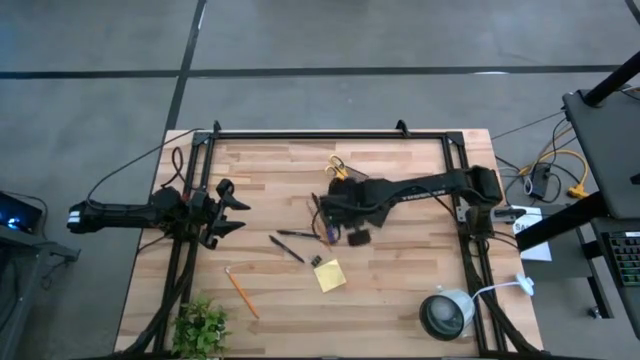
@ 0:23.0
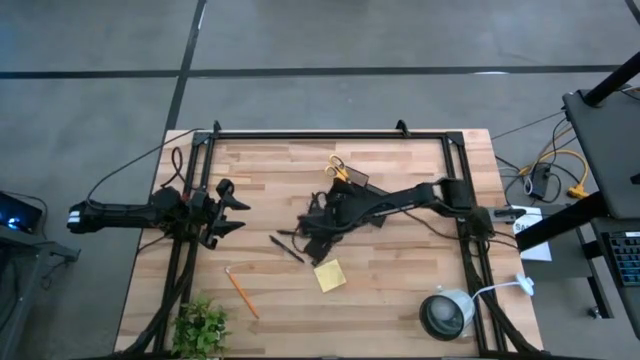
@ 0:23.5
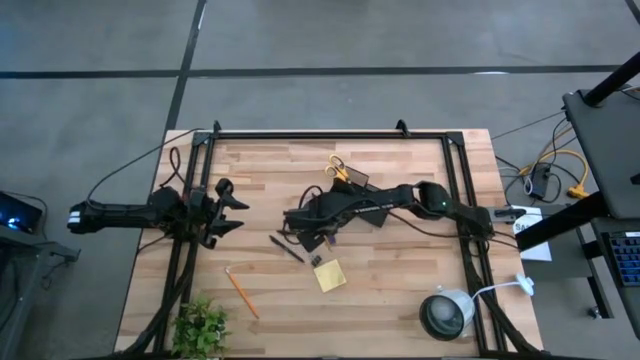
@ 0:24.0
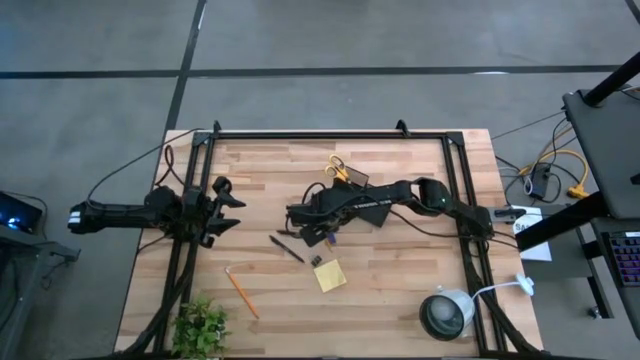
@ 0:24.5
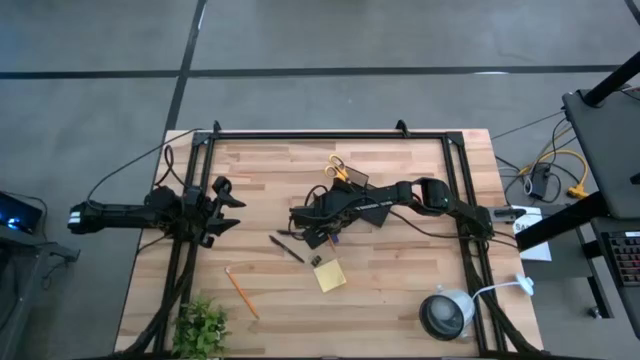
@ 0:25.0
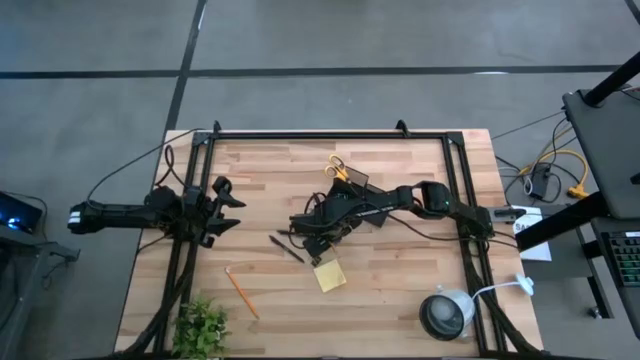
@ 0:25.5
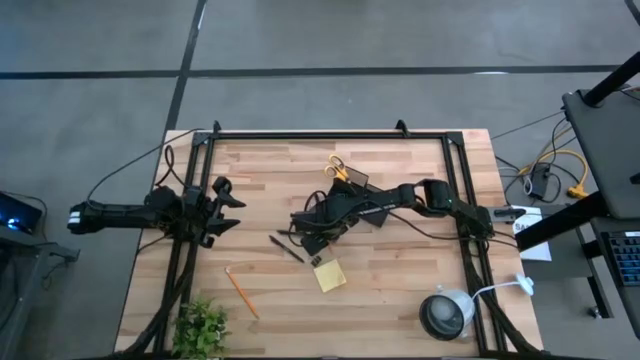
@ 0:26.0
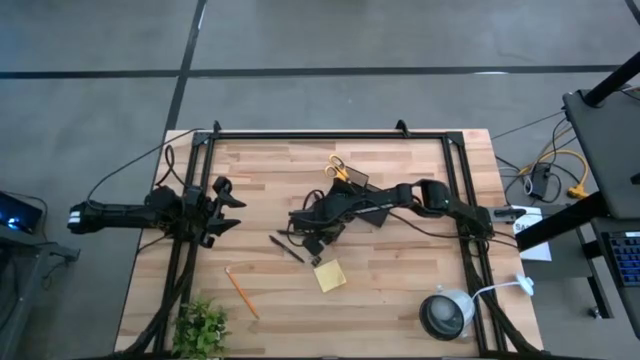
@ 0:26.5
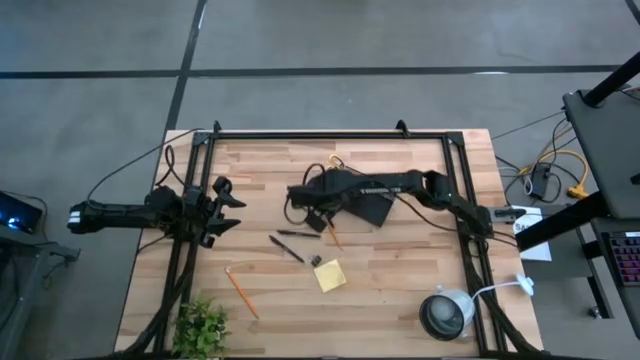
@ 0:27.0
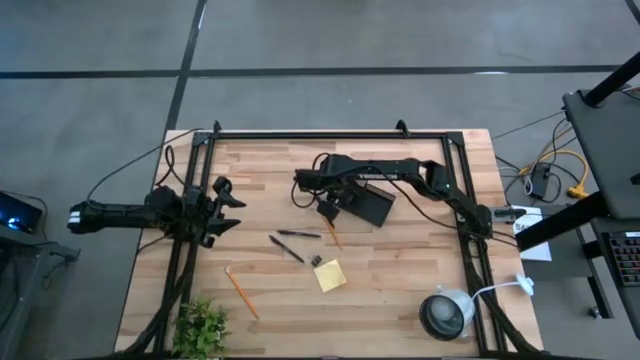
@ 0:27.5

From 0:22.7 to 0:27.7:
Task: Pick and place office supplies into organizer
Put the blue eraser into the black desk organizer

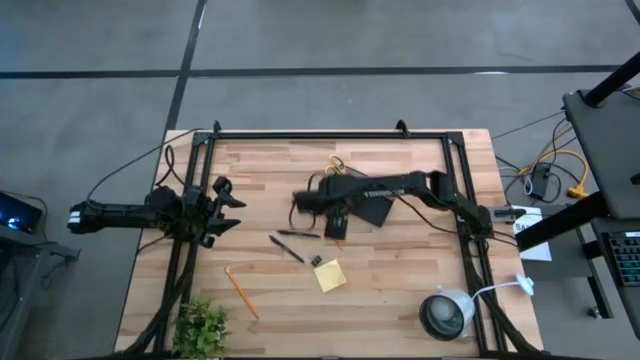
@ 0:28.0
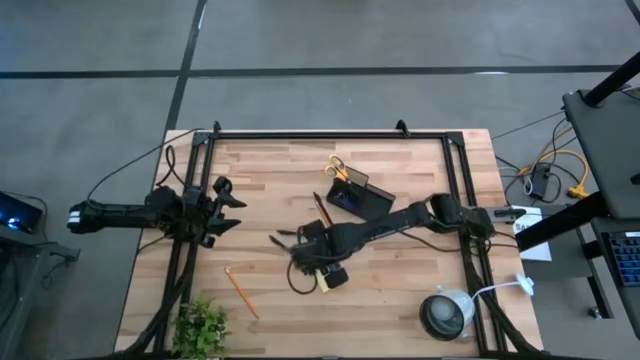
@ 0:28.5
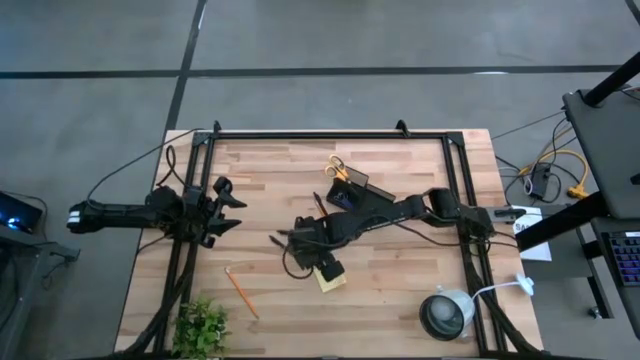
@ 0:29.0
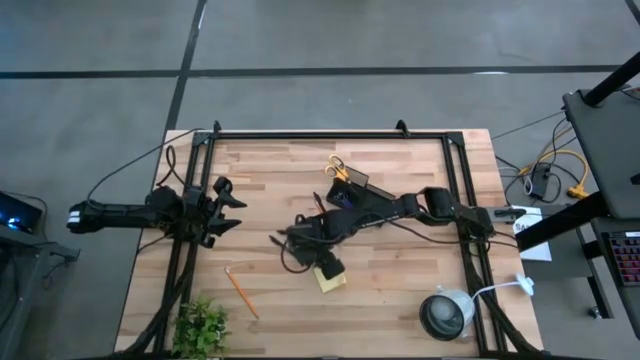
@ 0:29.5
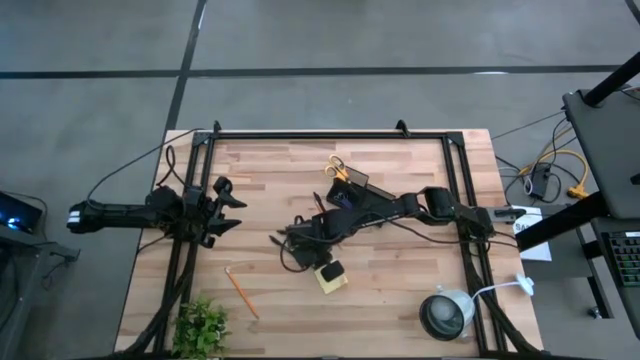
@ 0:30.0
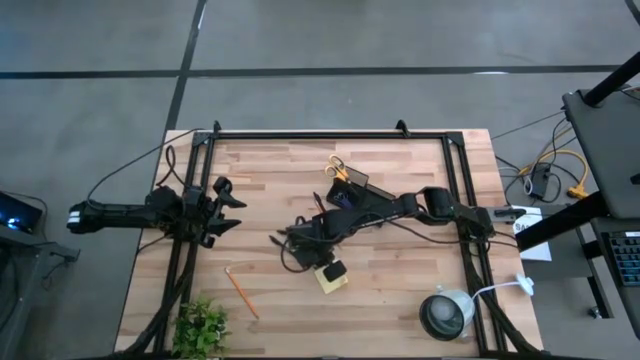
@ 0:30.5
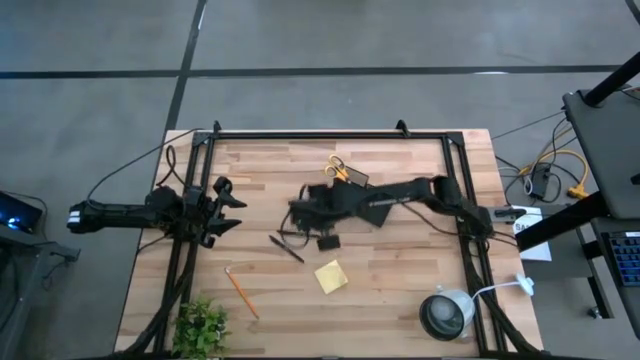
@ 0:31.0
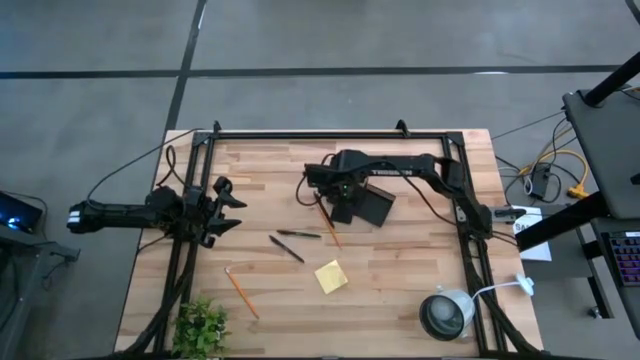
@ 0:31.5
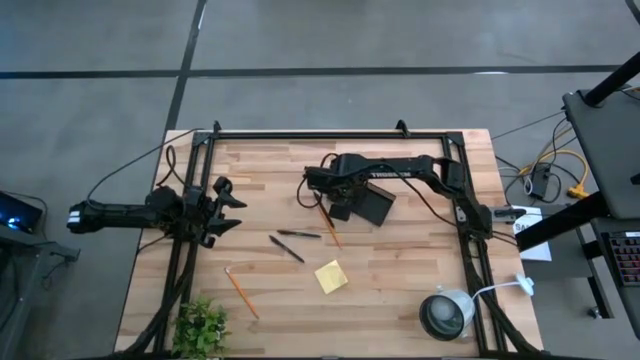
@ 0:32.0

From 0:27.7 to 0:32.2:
Put the black binder clip into the black desk organizer

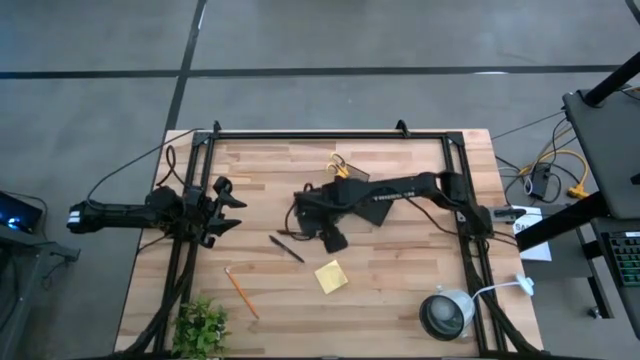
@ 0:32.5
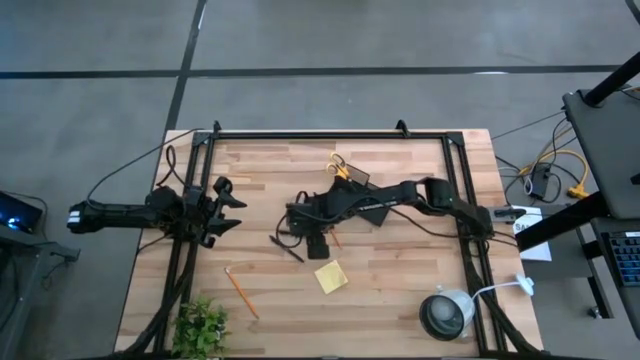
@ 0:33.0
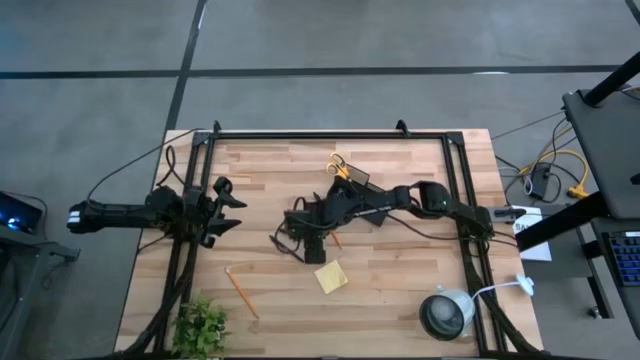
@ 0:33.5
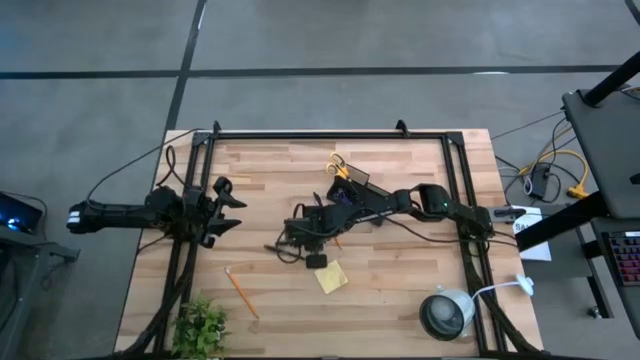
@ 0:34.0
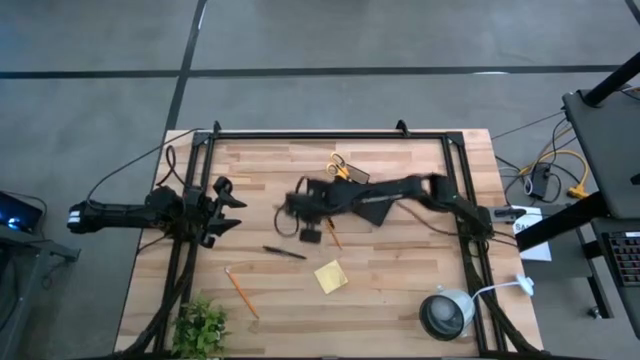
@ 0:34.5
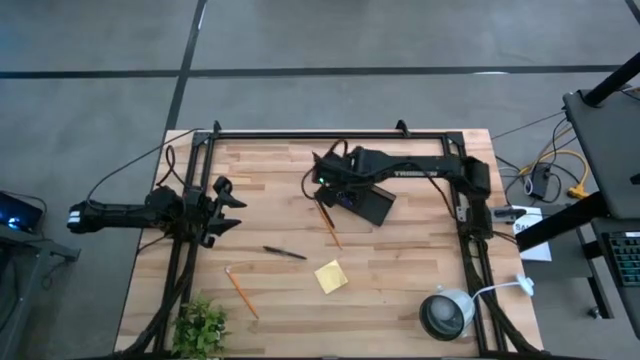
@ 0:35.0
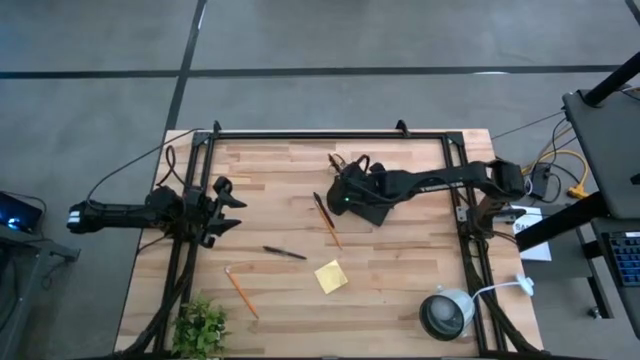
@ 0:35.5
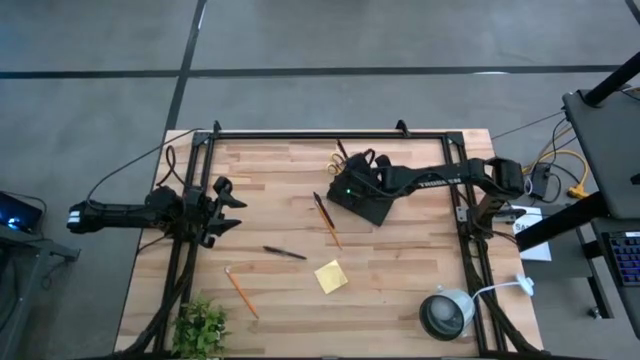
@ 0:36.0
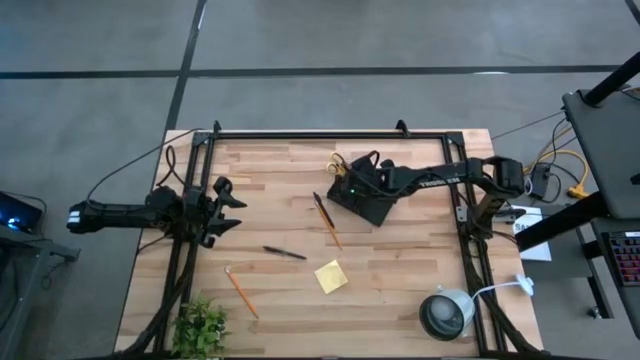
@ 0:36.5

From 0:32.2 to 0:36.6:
Put the middle black pen into the black desk organizer

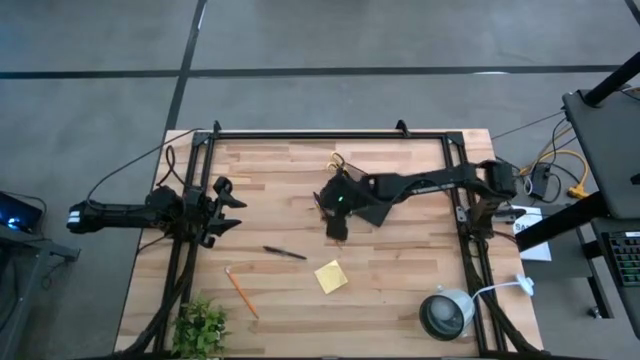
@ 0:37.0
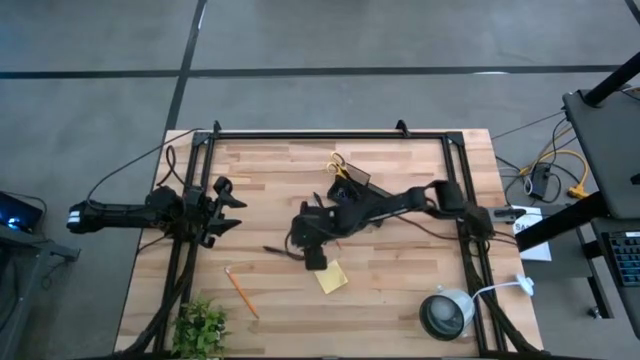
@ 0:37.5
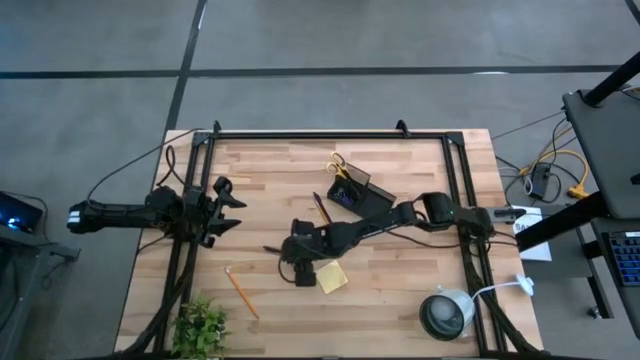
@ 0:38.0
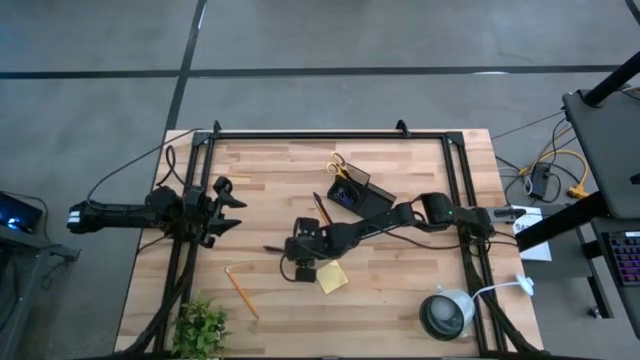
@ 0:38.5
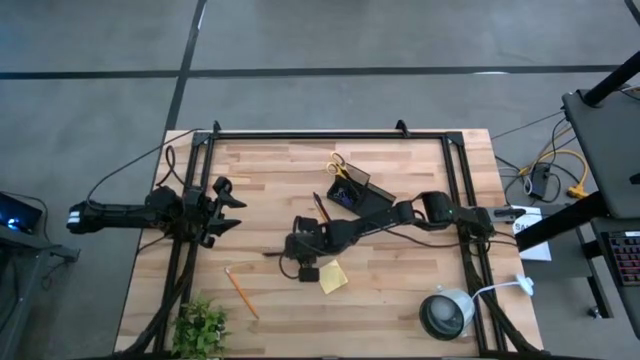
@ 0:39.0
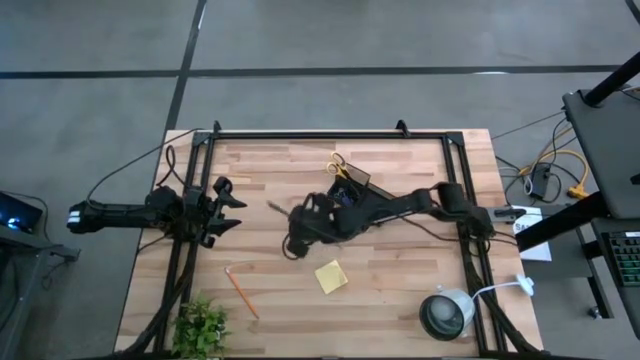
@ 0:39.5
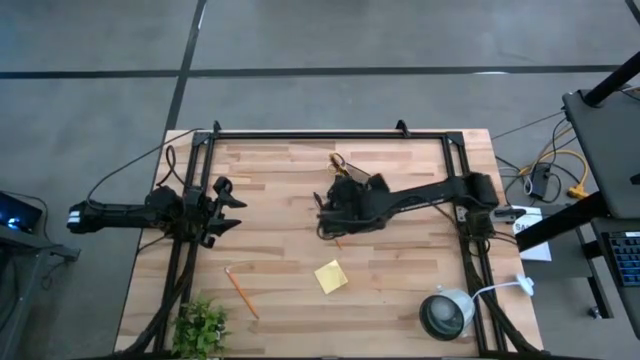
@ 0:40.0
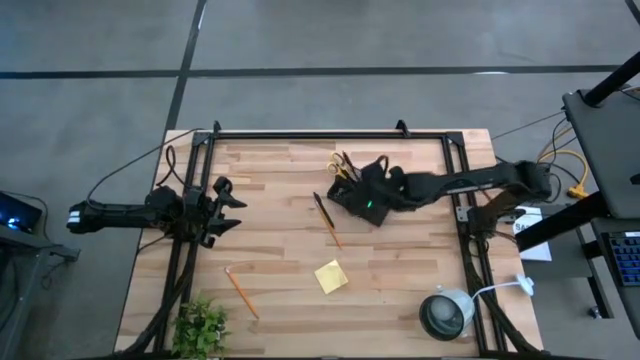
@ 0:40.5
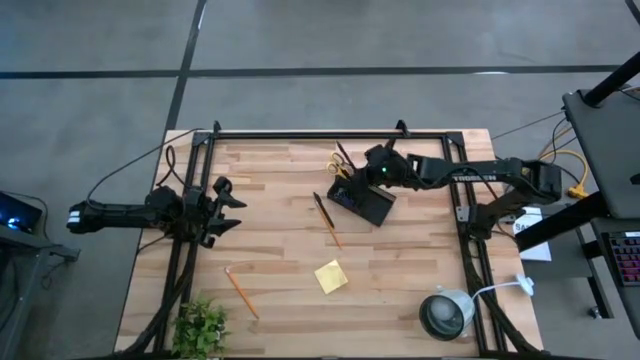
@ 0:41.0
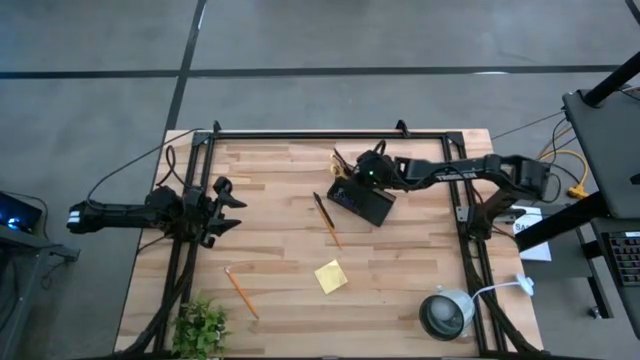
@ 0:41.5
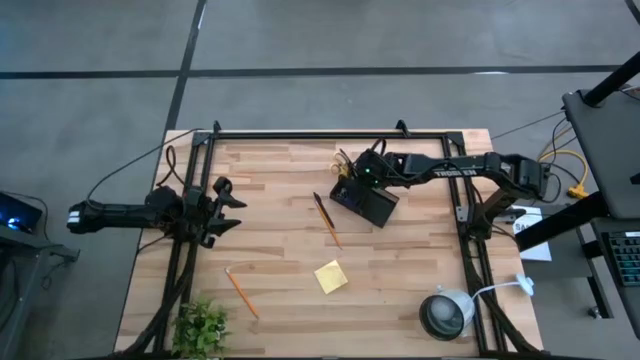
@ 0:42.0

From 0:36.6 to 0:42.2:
Put the bottom black pen into the black desk organizer

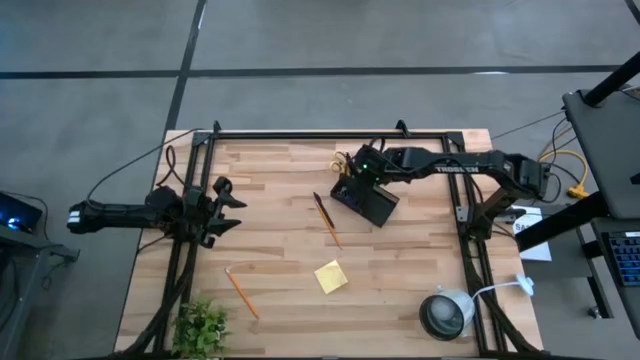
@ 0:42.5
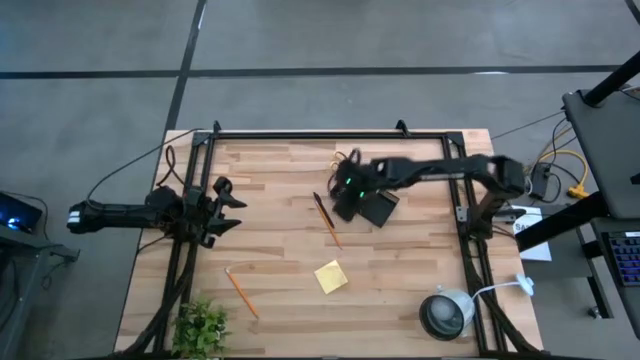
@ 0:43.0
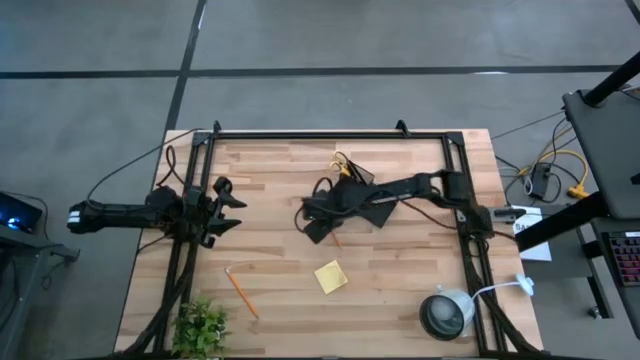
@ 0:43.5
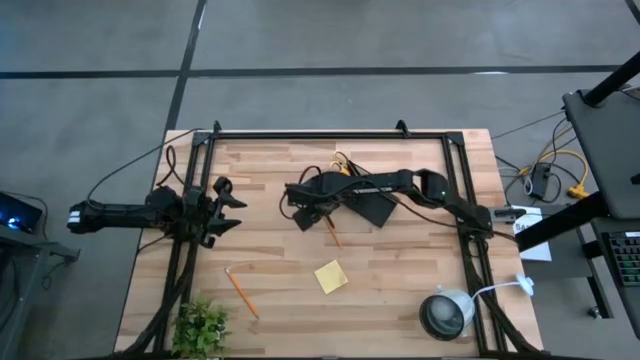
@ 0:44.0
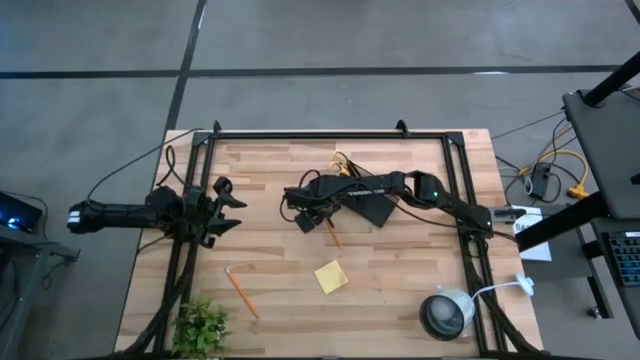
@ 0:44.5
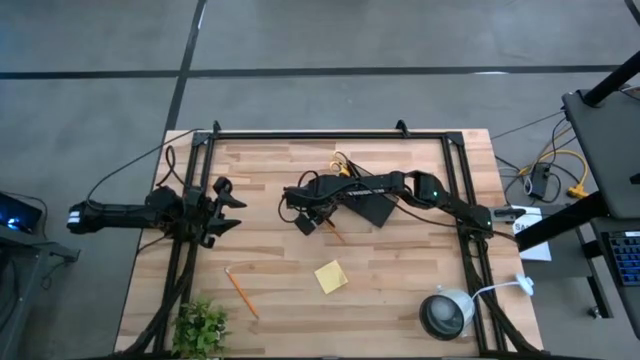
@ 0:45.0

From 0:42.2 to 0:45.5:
Put the black pen into the black desk organizer
